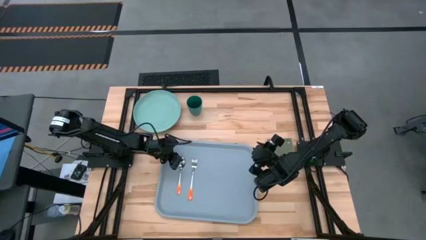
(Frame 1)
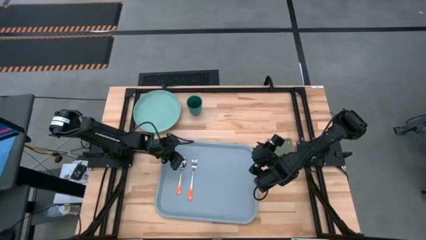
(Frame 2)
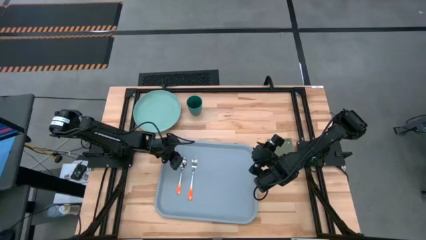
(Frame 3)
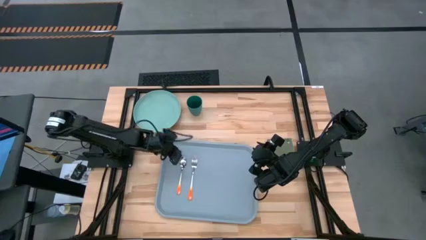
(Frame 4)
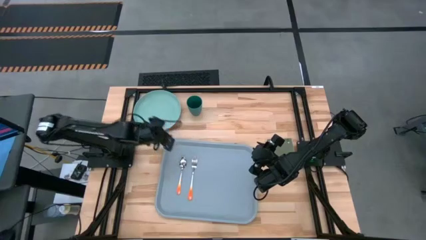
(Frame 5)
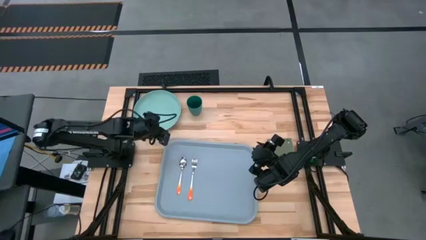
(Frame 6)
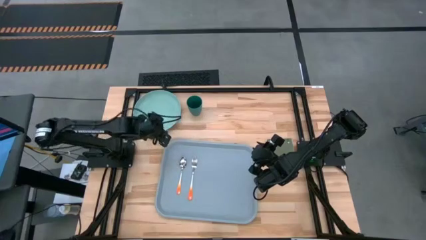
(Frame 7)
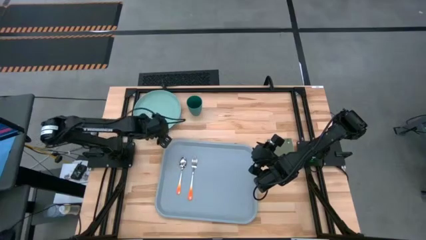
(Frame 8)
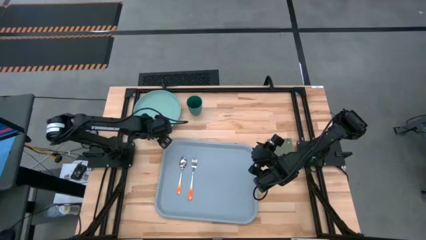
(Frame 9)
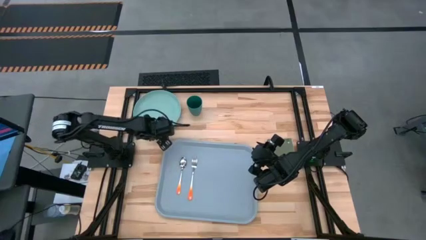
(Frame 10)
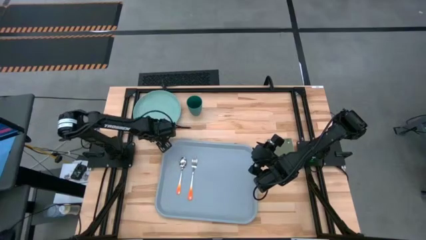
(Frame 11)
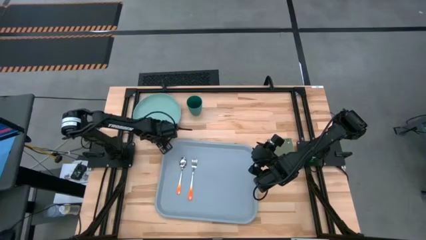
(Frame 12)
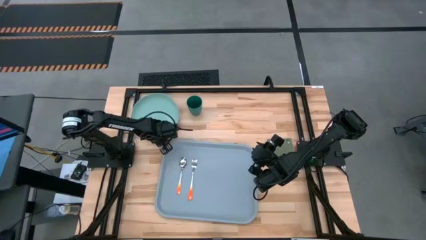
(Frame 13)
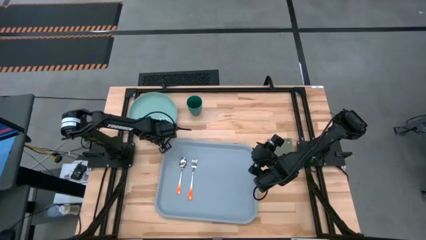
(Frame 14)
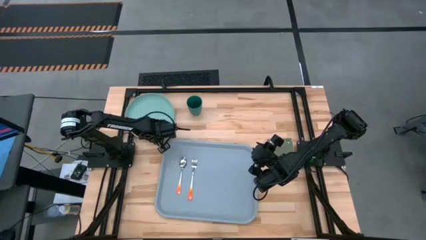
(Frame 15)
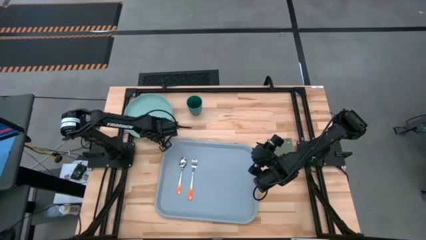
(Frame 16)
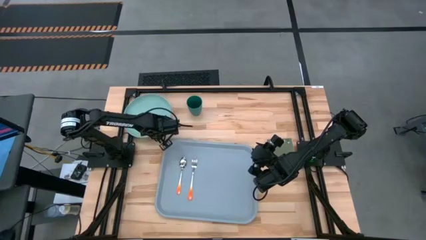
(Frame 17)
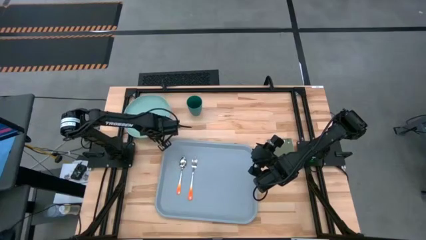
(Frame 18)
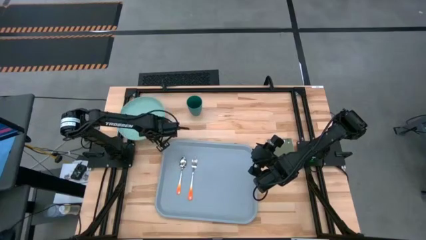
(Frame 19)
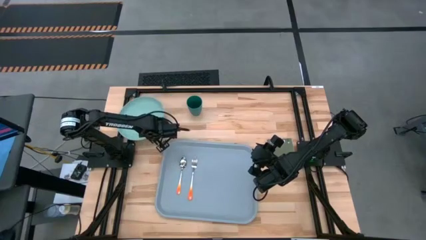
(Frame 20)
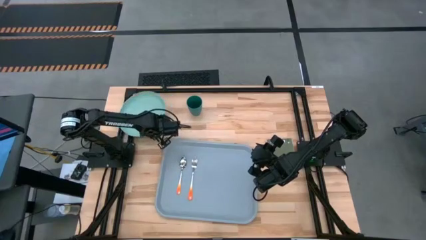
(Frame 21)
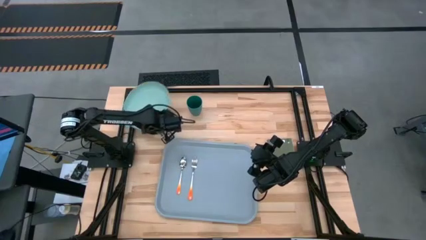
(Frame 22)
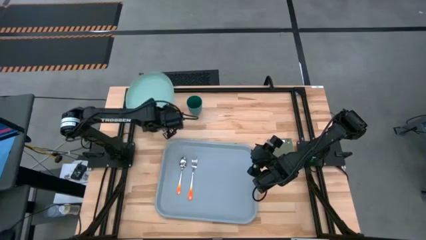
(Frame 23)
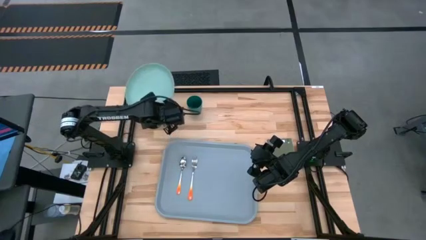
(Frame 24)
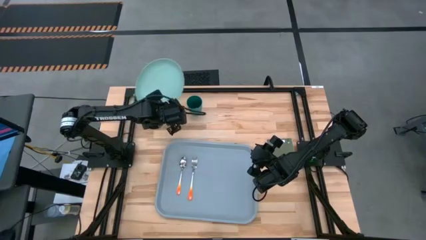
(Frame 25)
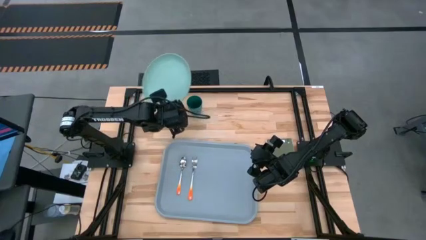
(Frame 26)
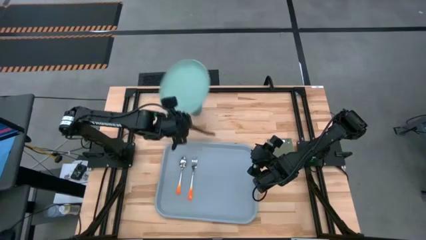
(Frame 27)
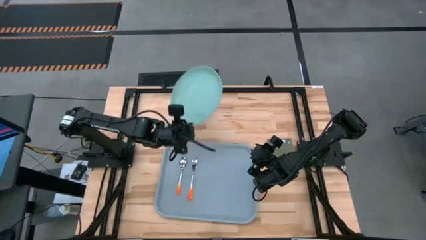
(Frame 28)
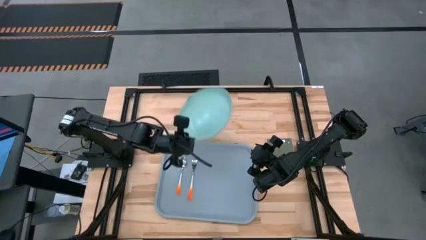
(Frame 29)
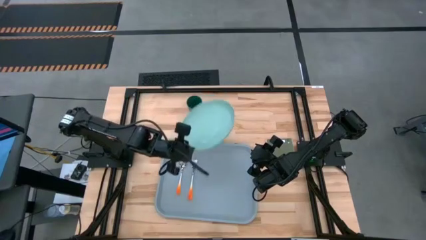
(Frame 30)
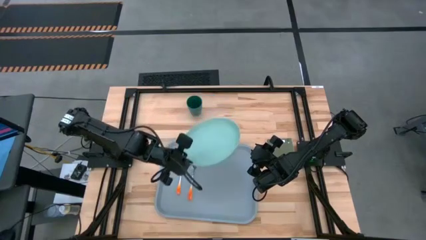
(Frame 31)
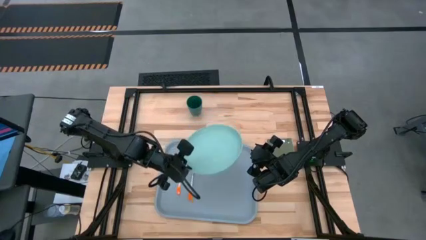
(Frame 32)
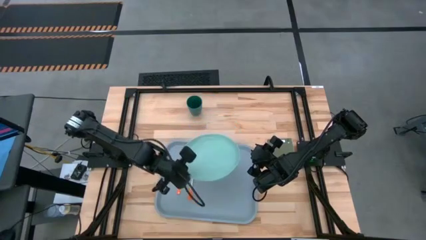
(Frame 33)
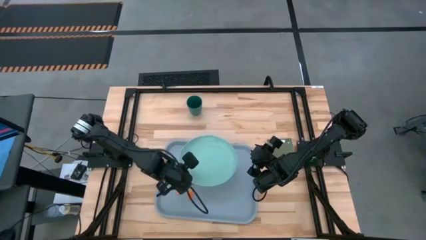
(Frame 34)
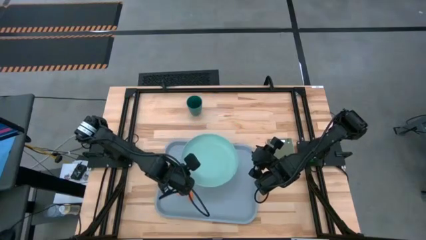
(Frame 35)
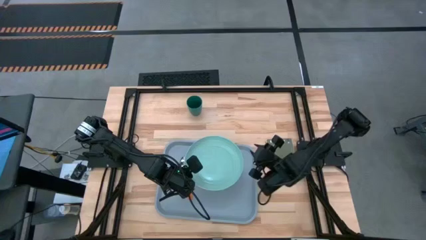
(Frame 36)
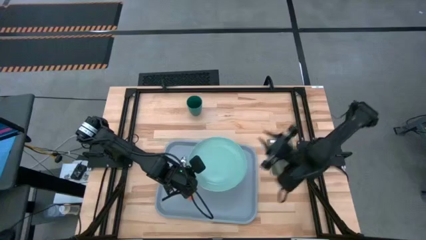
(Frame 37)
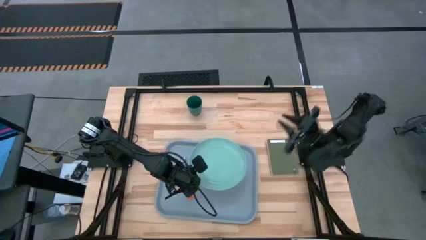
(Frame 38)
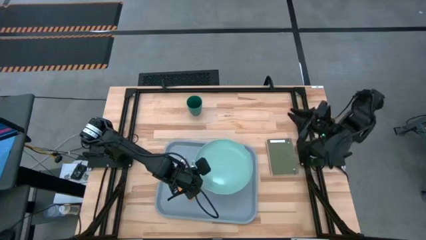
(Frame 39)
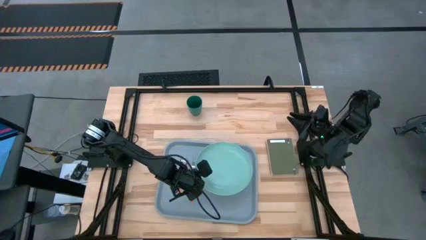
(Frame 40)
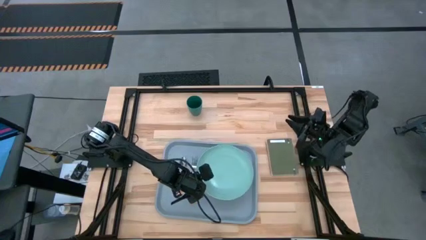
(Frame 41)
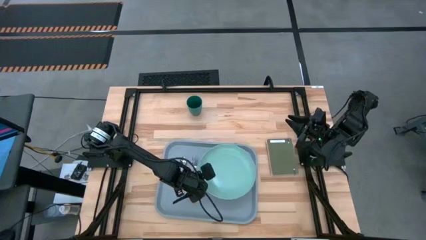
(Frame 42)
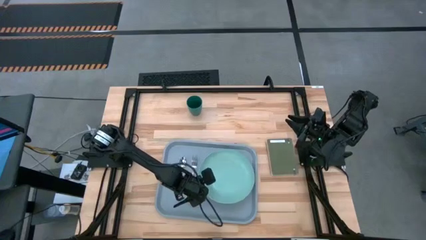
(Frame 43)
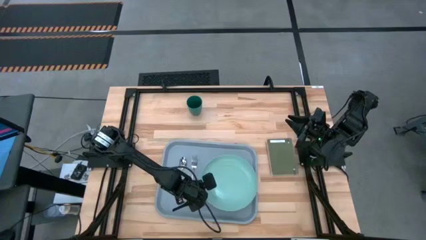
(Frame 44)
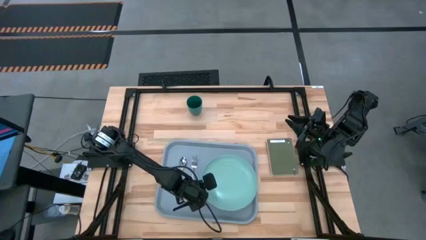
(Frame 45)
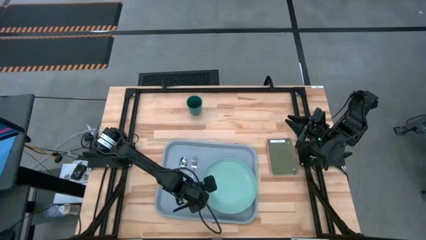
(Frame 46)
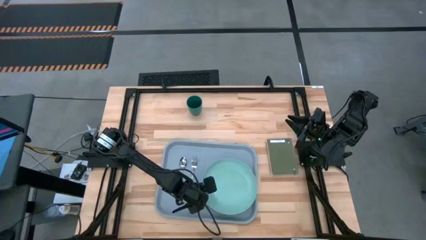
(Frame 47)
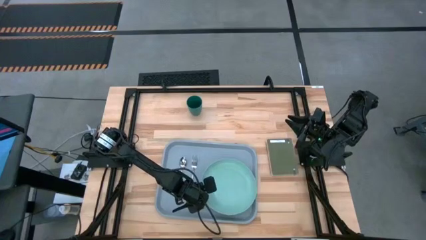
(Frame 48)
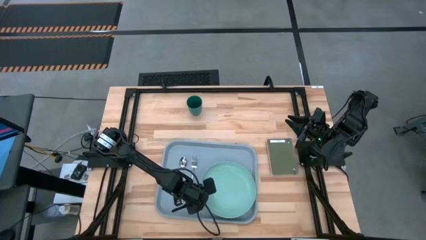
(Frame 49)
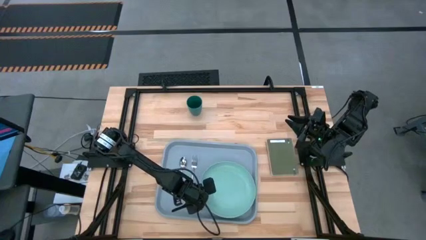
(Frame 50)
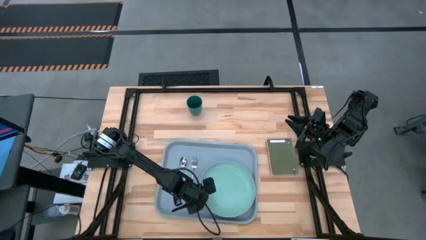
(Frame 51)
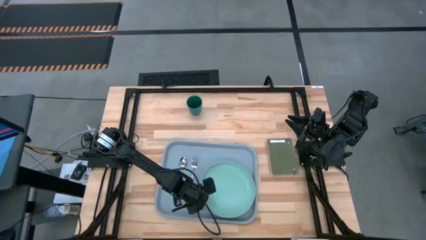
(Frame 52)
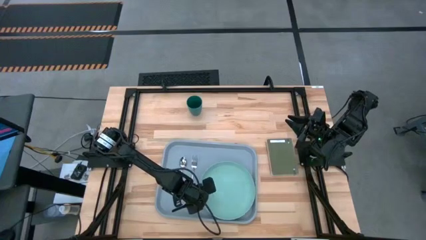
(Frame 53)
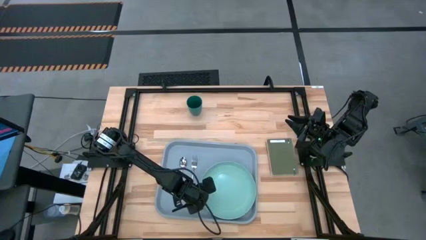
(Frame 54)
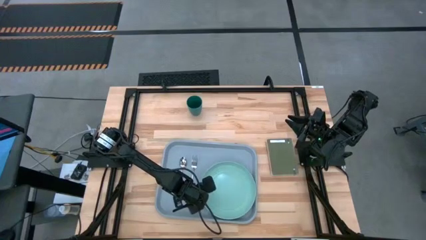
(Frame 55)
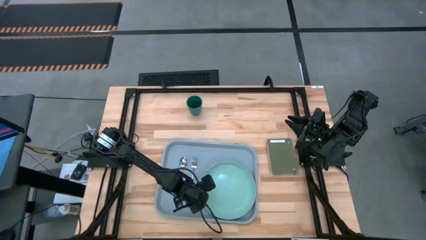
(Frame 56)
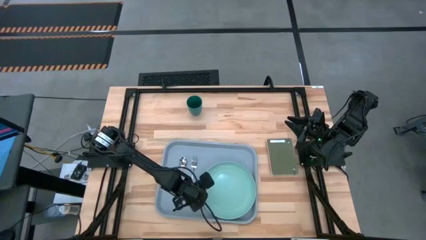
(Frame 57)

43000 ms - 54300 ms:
Task: Pick and place plate/cup/fork/spoon on tray
Put the green plate to the right of the orange fork on the blue serving tray

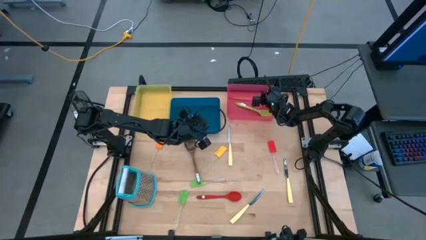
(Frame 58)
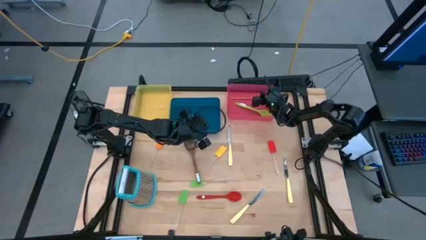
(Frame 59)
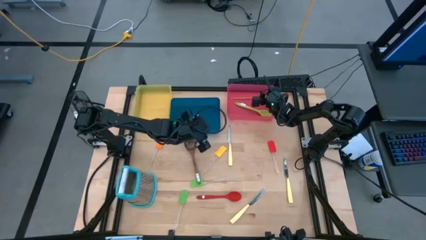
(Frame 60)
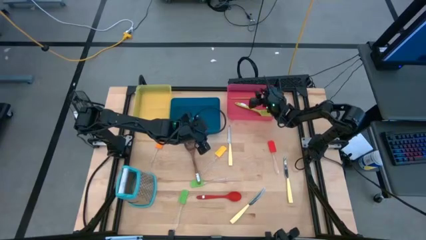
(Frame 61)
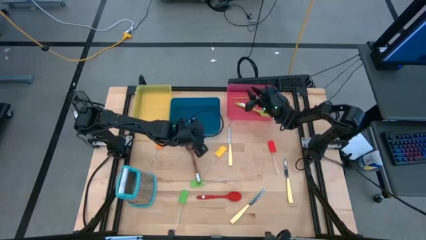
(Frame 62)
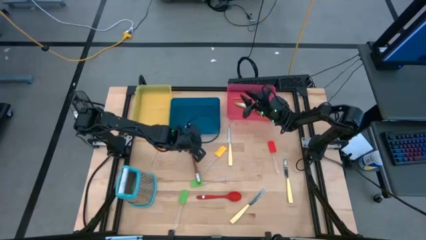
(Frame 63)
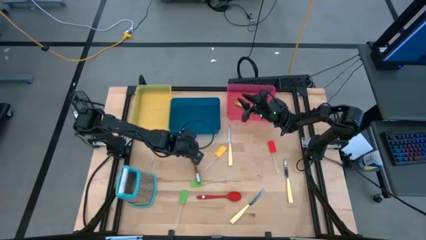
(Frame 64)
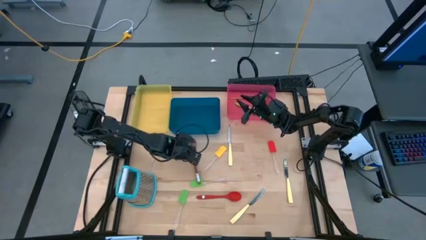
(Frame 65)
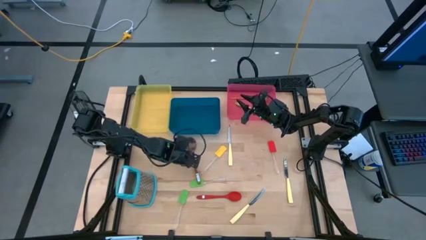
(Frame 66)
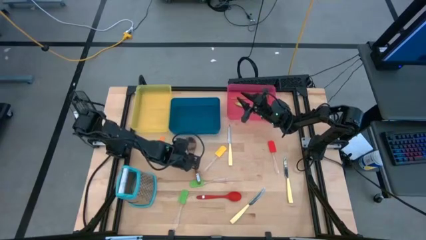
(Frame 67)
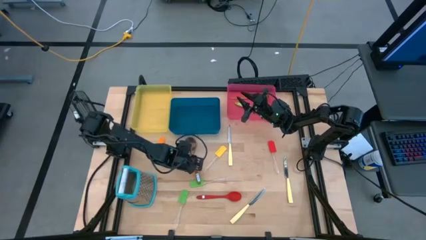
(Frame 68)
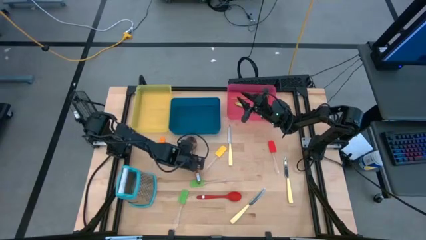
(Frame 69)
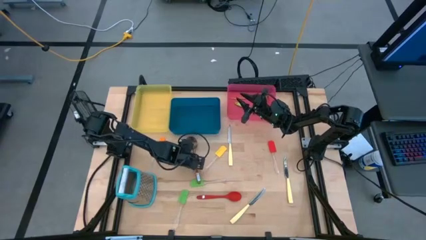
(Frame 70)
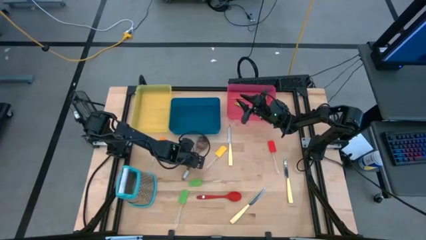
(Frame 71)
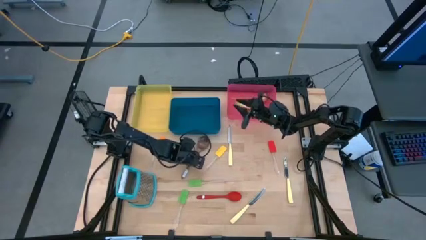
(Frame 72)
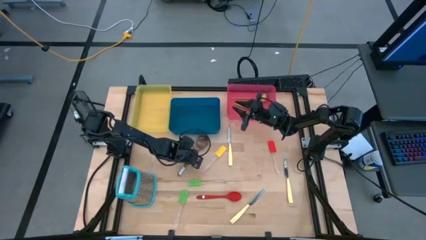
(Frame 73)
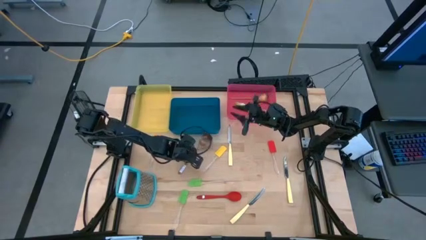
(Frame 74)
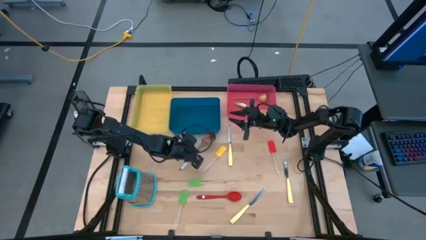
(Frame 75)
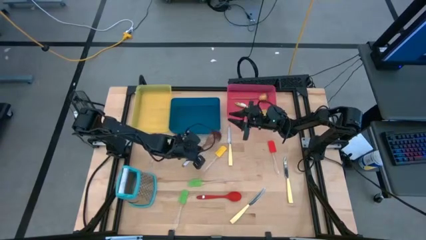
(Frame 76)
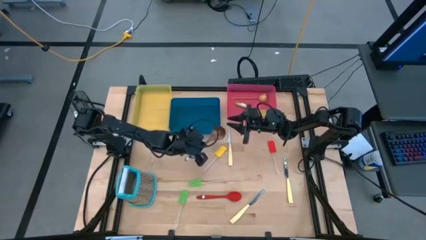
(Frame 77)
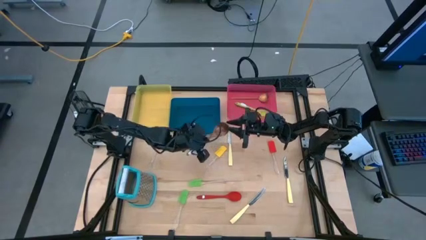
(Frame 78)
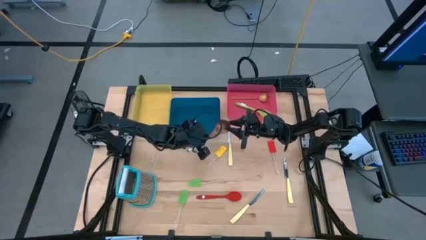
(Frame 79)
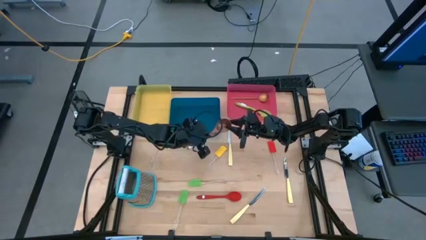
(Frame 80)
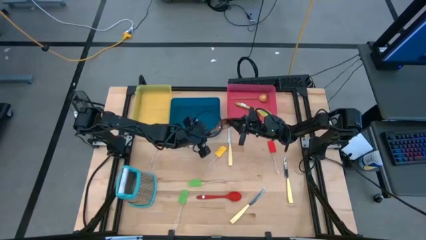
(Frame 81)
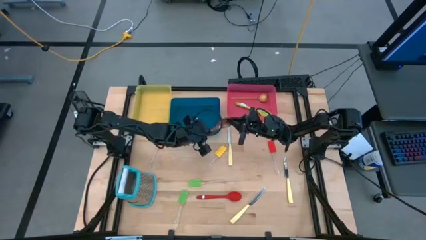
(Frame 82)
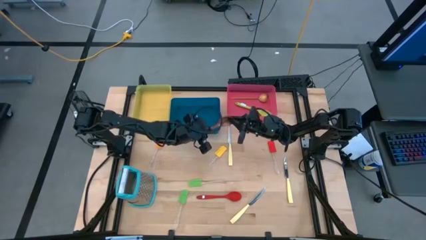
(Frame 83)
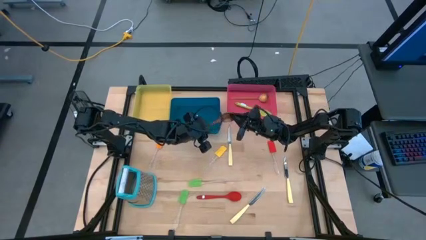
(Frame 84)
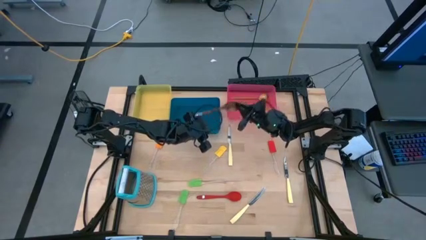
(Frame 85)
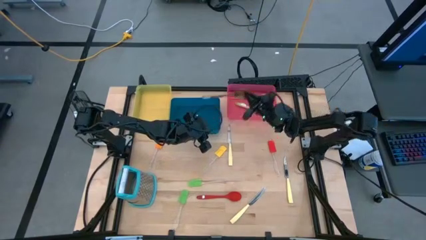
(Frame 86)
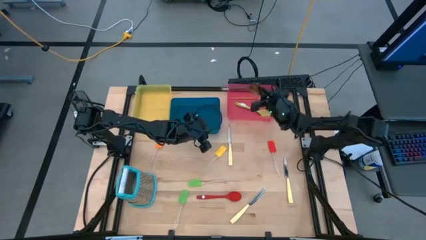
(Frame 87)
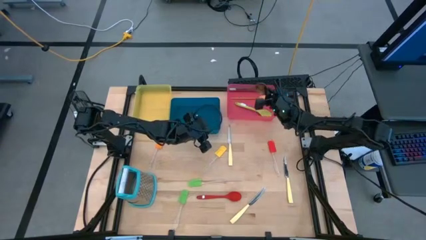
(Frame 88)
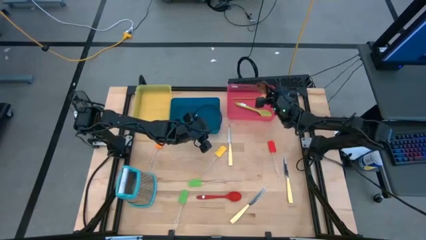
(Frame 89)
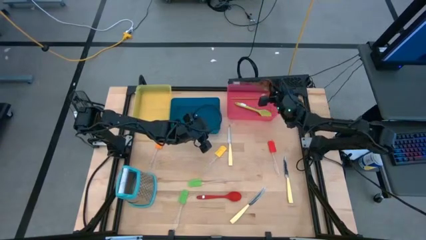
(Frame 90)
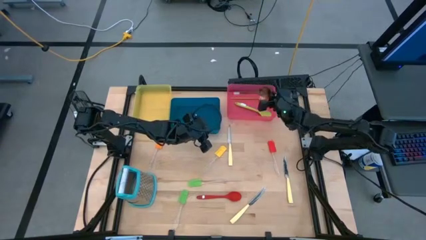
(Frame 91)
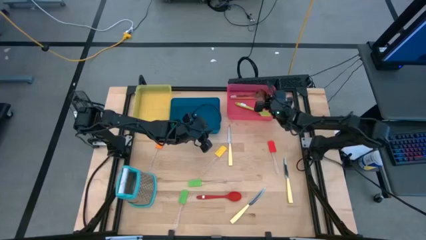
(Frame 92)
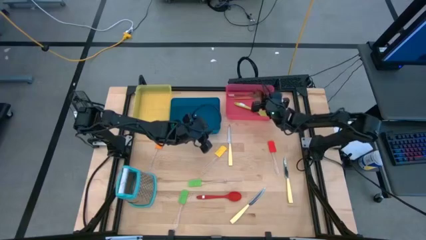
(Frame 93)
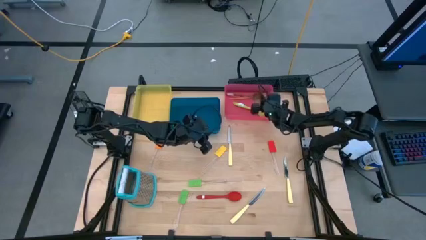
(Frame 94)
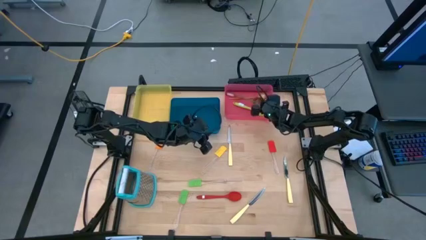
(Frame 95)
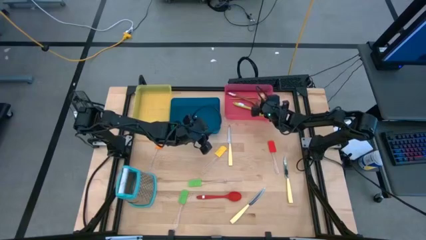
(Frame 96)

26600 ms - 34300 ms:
Task: Pick & Place Kitchen Items
Put the brown serving spoon into the red bin
